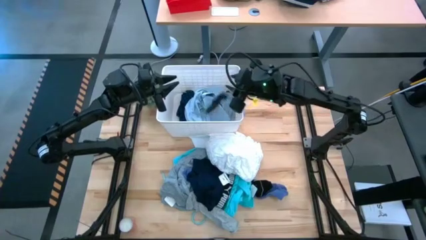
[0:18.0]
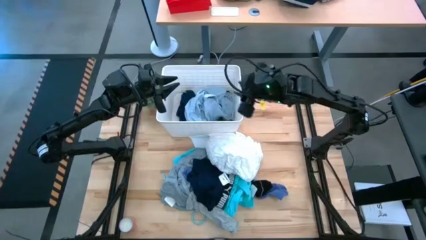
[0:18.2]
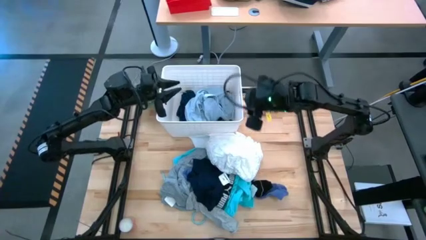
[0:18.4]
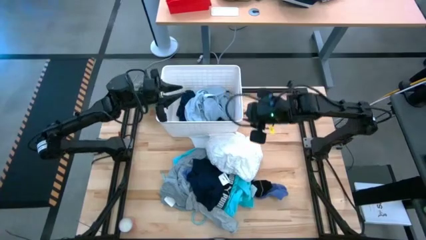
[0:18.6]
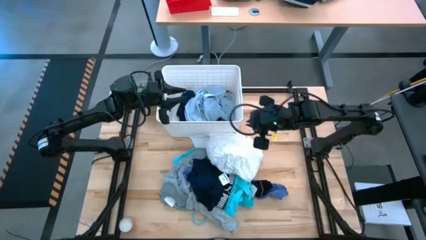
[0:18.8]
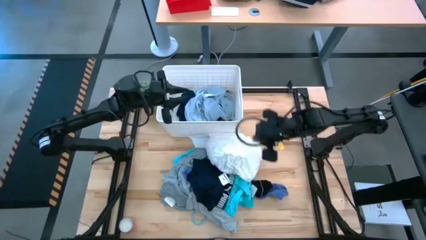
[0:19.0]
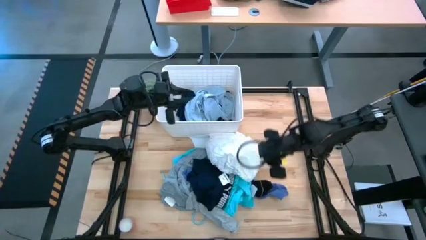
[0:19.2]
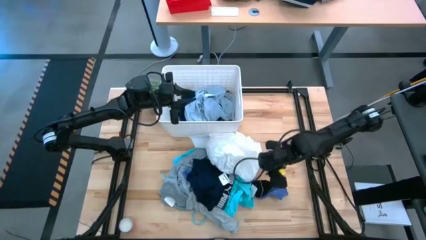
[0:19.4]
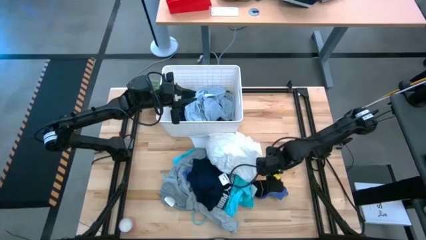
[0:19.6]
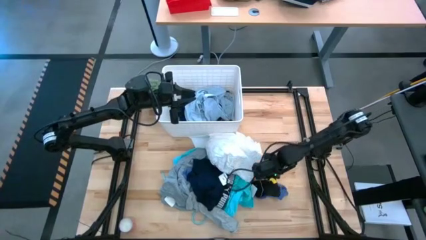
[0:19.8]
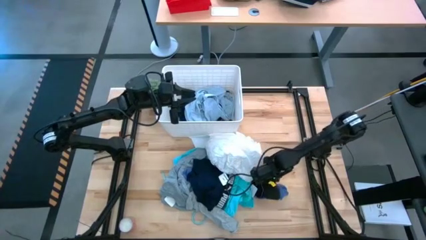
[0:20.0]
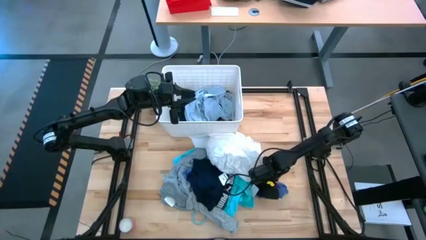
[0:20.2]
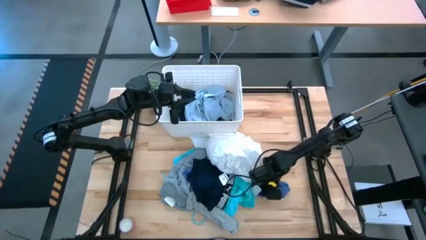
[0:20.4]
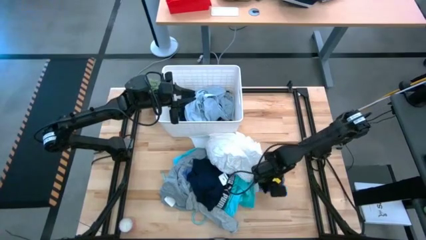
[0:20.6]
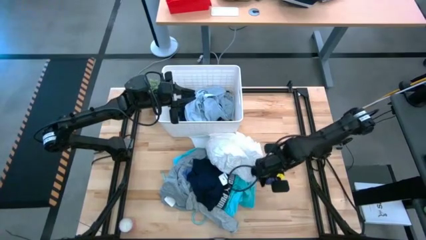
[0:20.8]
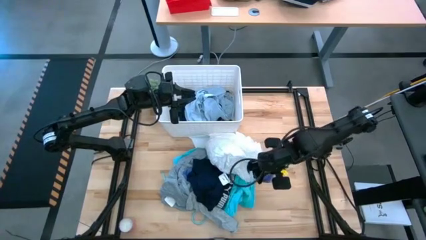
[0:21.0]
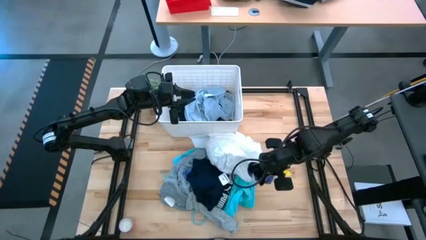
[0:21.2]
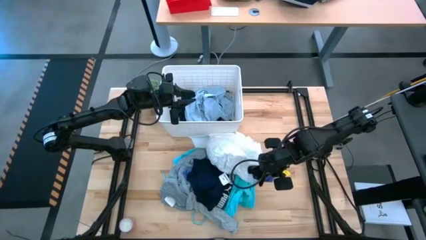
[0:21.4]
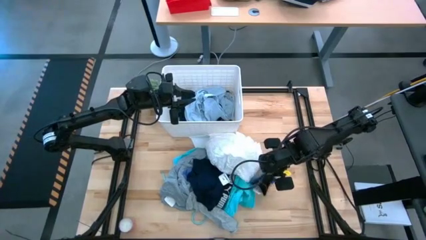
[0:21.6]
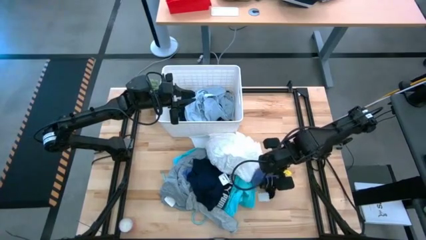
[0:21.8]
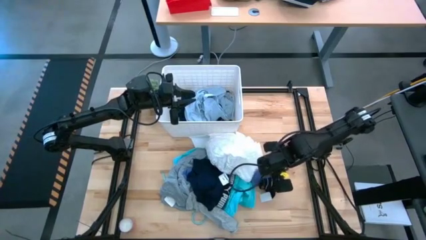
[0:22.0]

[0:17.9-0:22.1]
Task: Sort clothes
Put the black sock into the white bin

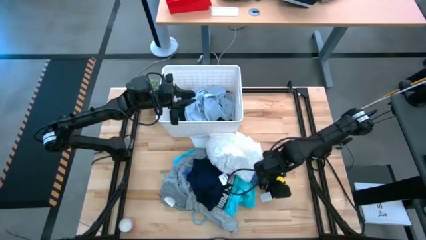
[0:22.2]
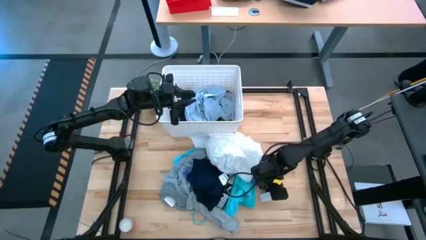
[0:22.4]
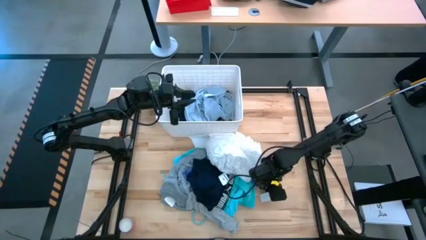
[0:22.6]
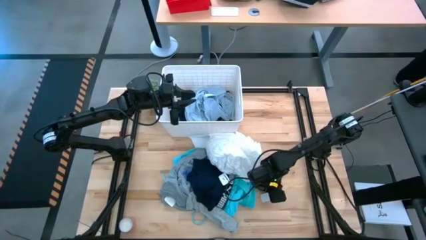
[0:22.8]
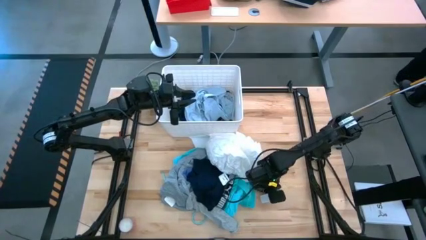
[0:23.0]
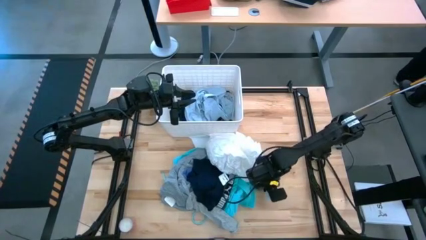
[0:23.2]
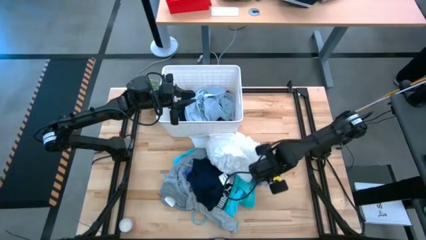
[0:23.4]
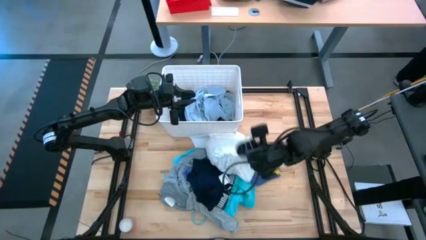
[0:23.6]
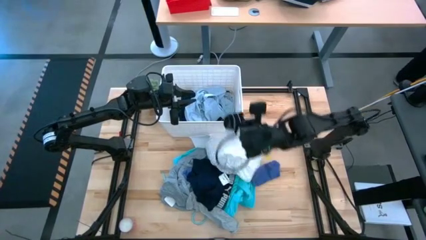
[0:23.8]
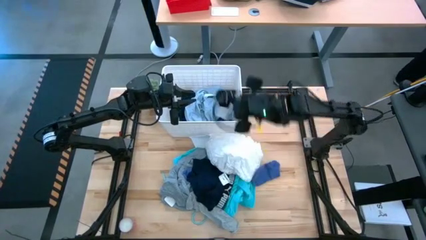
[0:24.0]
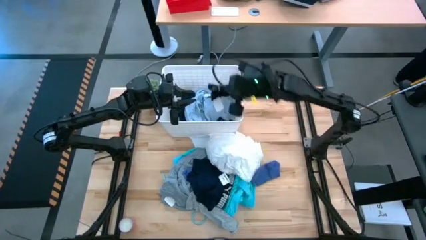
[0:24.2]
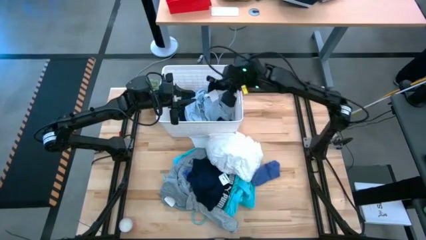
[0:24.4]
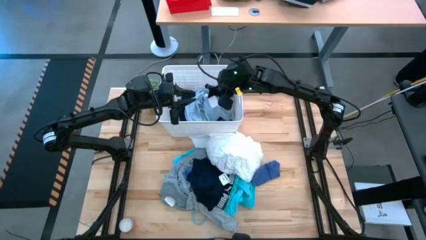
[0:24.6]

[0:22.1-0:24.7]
Put the black sock into the white bin

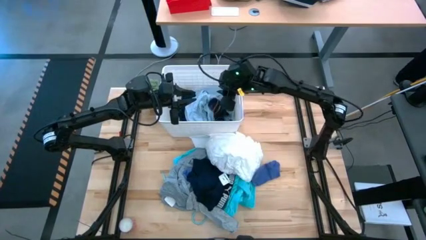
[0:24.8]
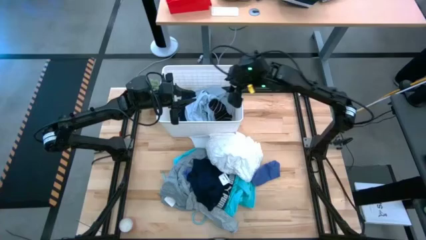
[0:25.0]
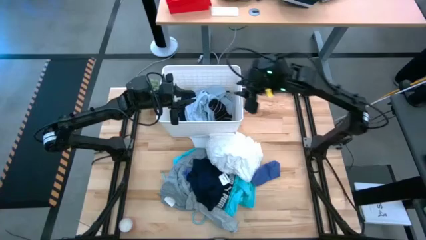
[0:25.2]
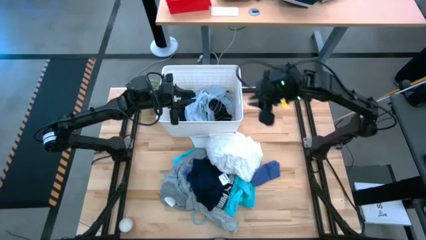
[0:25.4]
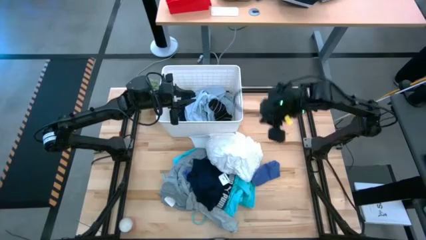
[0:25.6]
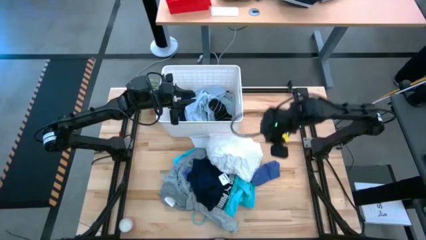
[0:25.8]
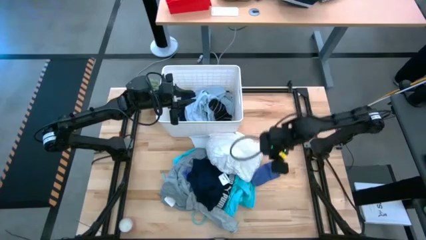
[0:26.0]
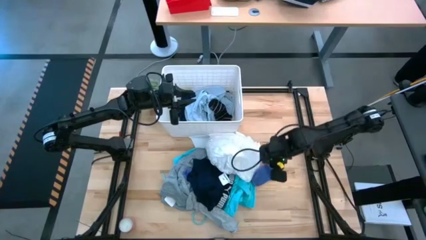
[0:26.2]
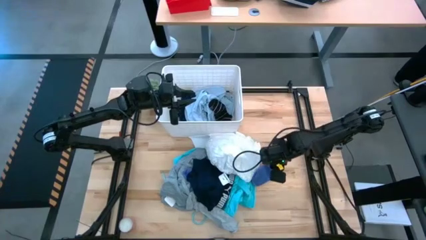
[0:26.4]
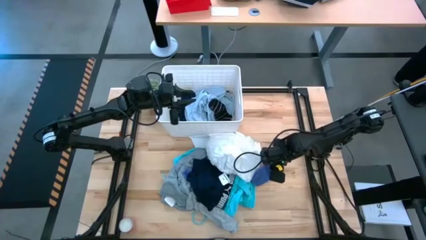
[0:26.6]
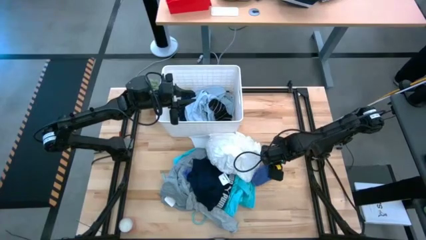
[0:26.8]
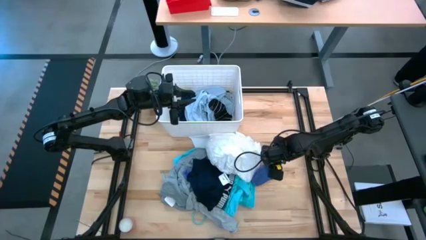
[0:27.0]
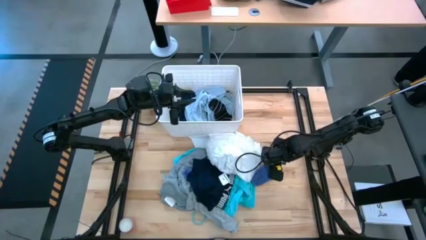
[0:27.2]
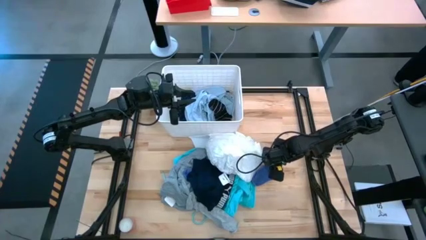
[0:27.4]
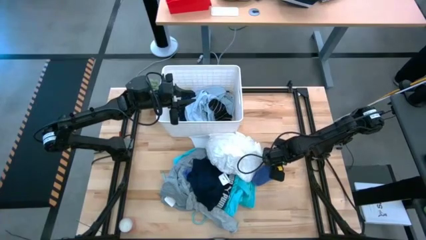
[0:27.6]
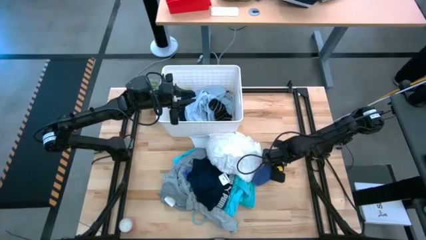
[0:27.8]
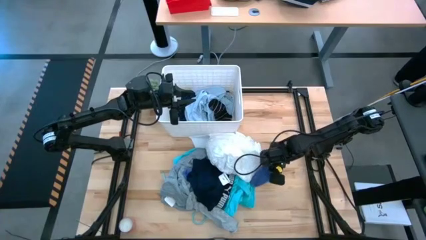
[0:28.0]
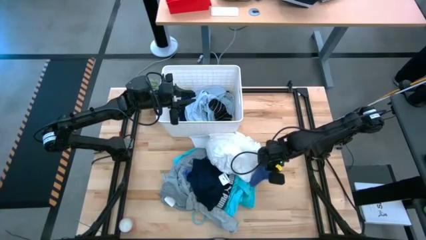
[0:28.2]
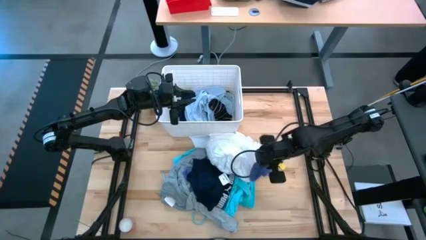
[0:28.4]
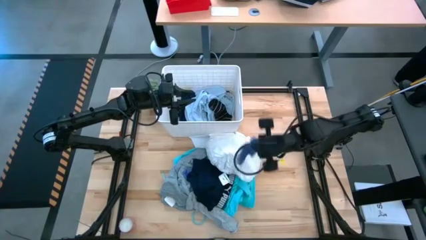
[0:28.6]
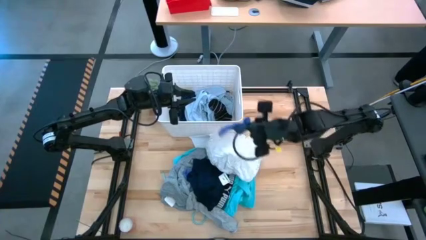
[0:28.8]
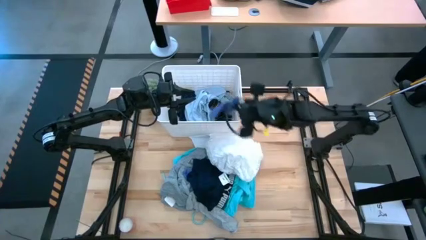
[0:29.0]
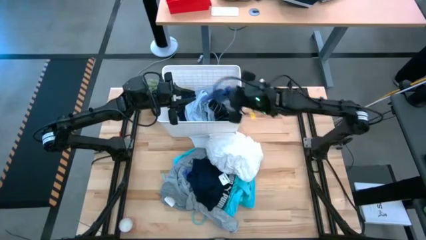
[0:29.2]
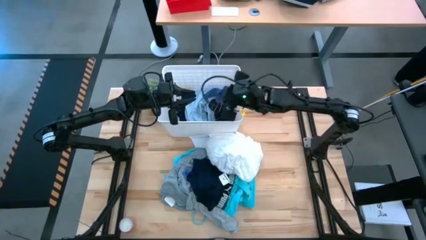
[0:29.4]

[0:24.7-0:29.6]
Put the right blue sock into the white bin

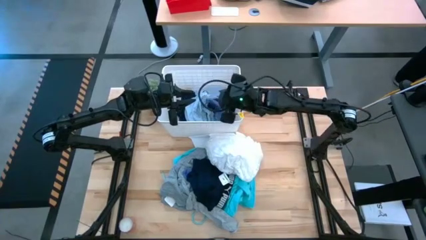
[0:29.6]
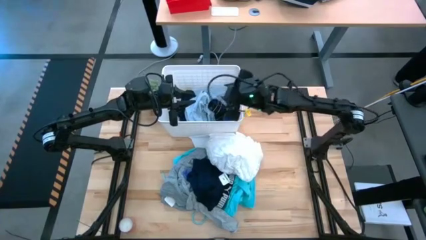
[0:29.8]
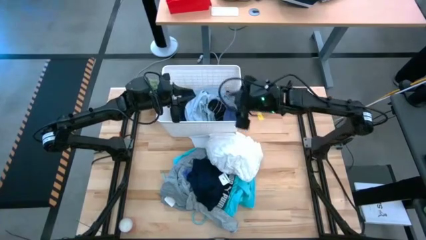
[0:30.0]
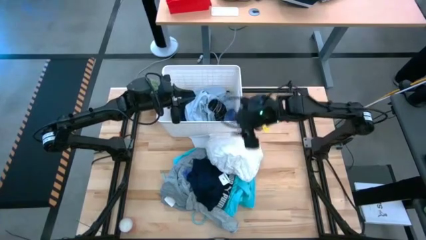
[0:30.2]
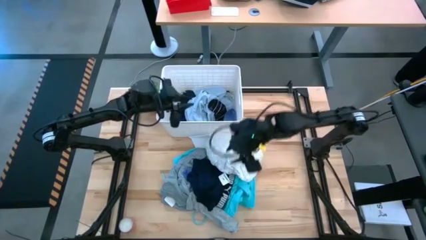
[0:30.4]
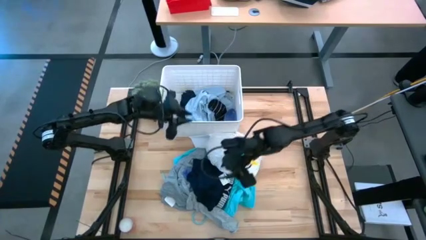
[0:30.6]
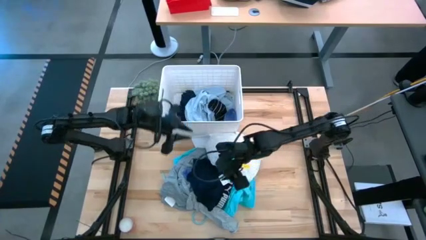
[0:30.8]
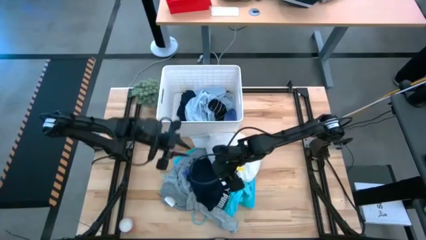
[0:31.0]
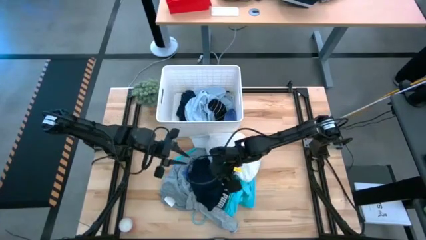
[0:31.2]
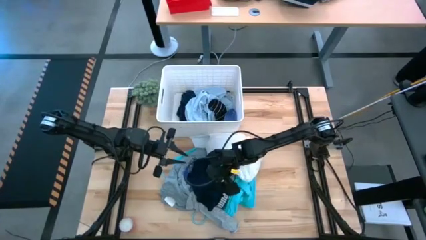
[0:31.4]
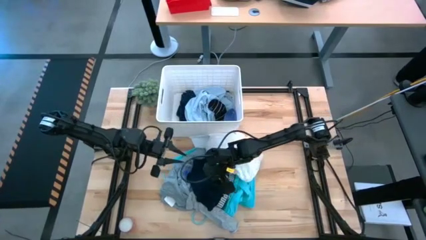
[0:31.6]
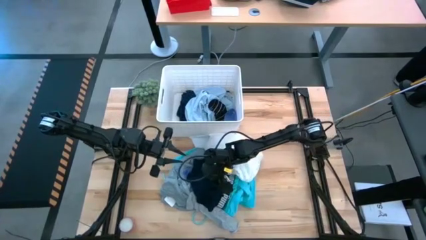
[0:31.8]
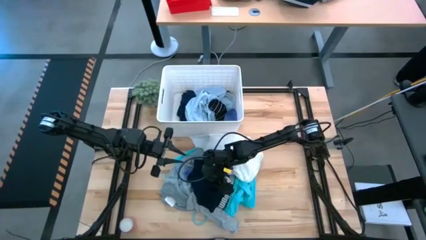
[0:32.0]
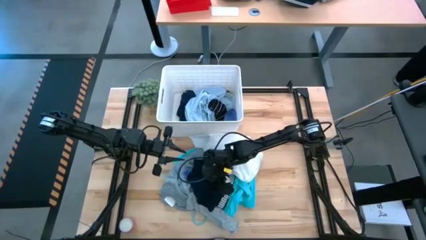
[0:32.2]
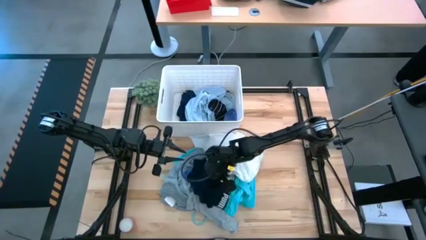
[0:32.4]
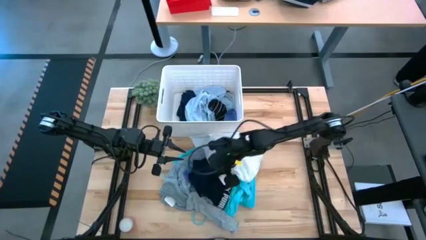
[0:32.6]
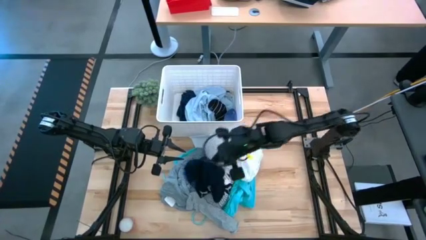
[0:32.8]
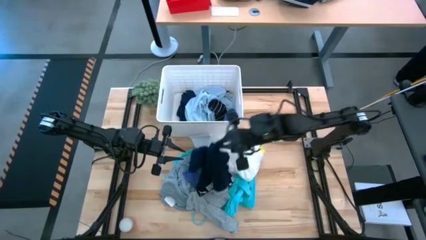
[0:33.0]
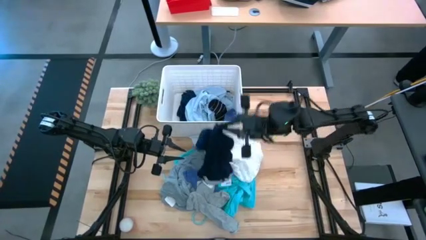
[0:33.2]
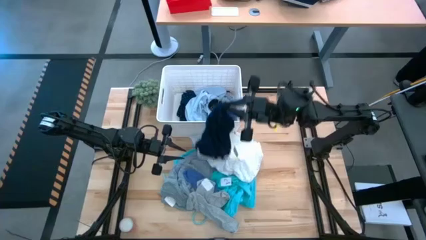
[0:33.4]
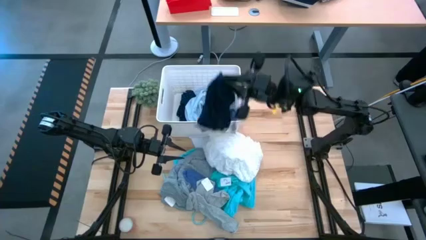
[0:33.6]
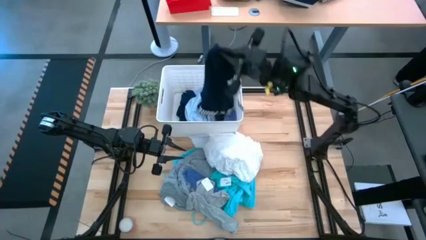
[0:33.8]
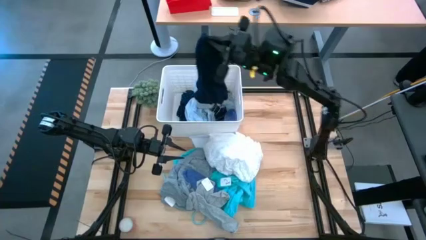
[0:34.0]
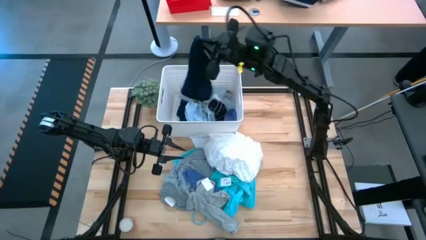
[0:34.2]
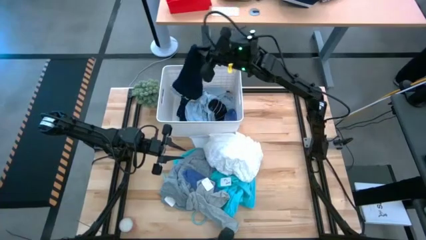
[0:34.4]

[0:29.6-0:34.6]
Put the blue boxers into the white bin

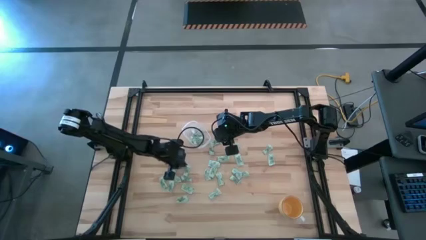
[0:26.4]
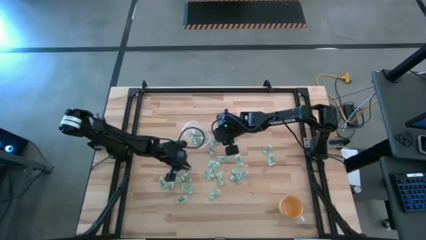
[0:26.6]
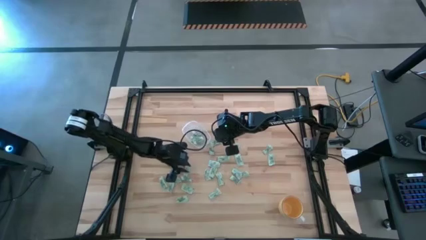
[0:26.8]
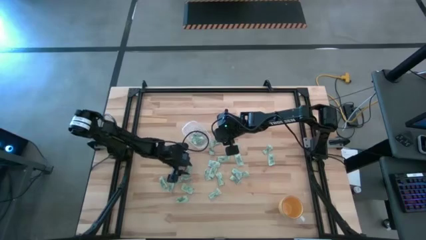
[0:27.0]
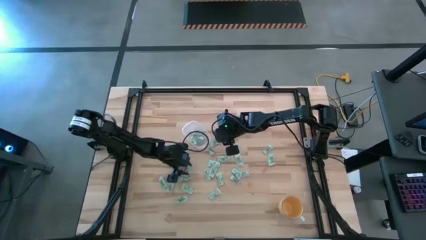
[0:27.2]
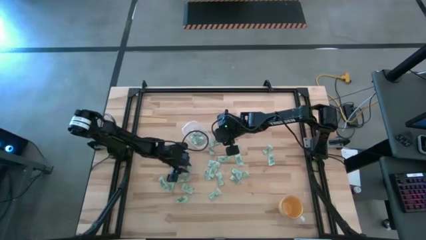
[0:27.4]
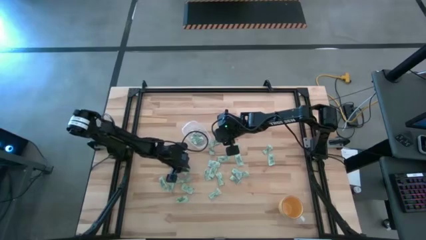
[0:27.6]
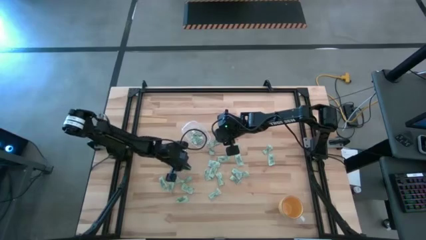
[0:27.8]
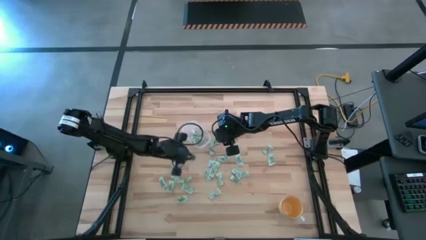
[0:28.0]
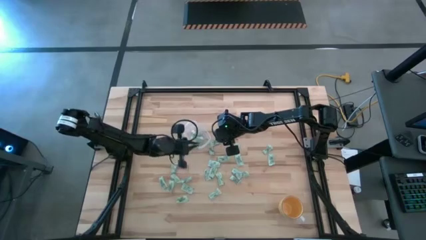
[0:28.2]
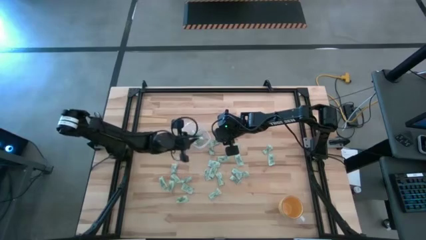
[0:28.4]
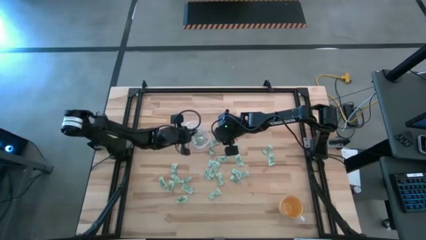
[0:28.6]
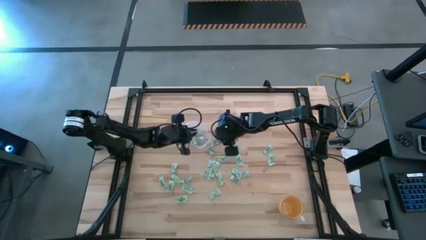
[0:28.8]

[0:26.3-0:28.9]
Task: Pick and place Stevia / Truvia into bins
Put the stevia packet into the transparent bin
